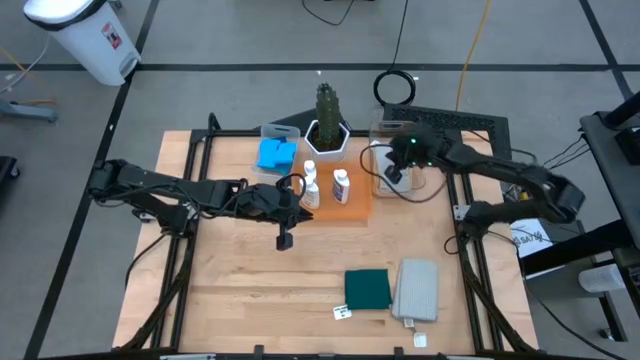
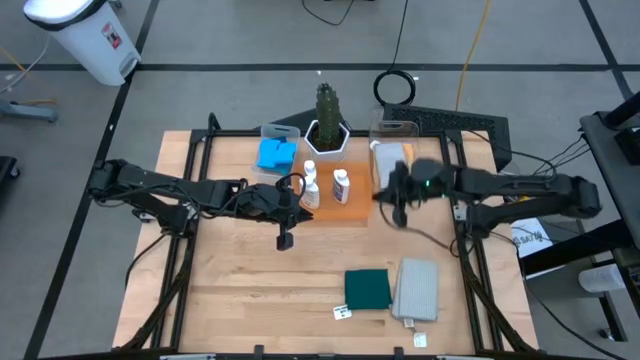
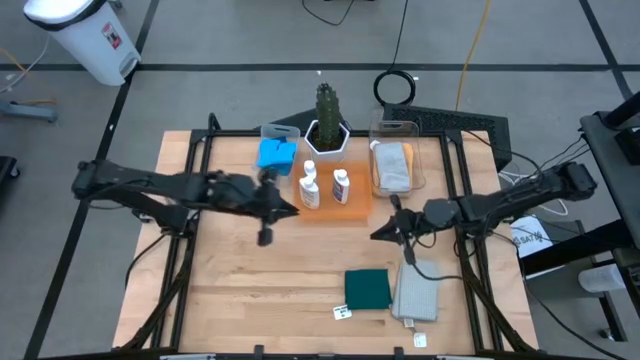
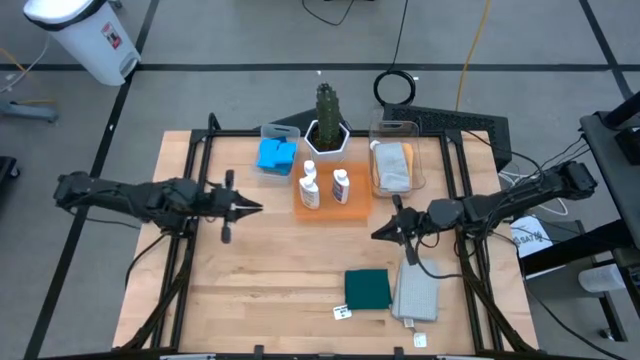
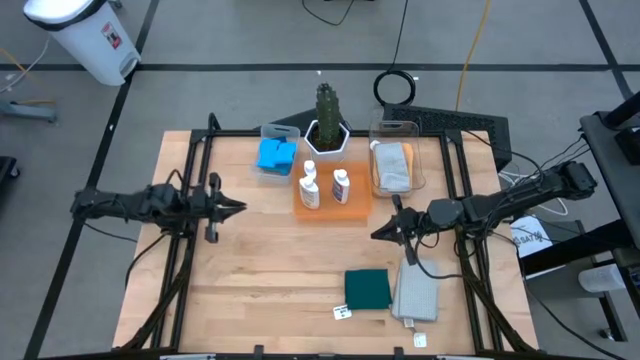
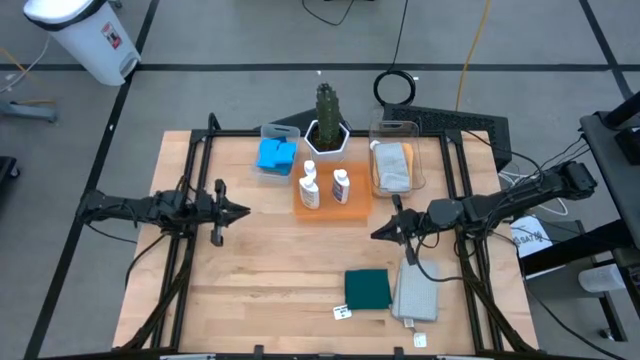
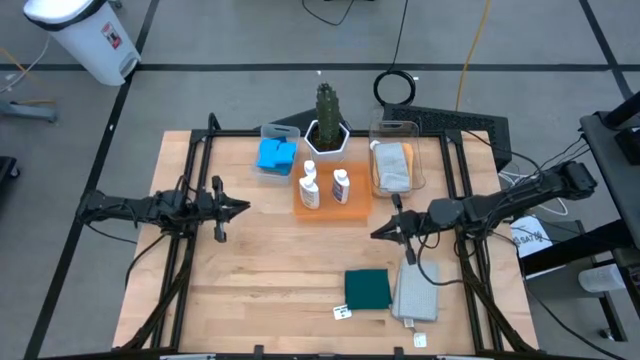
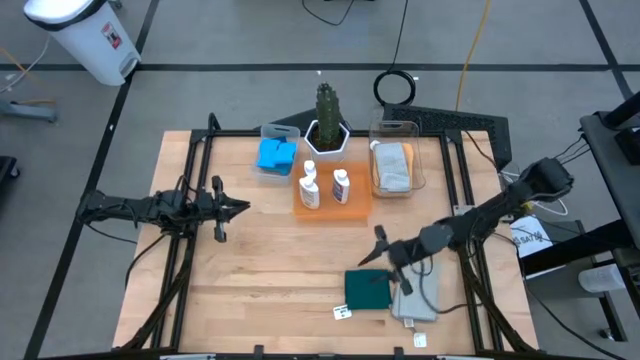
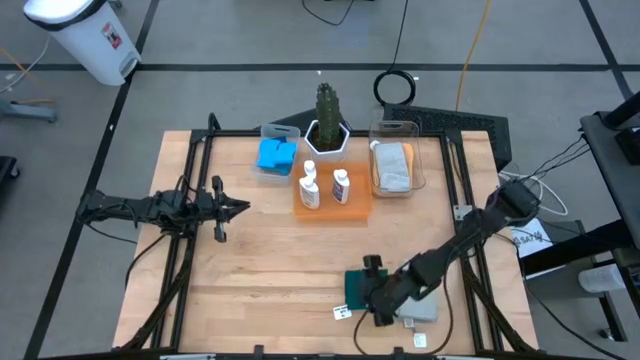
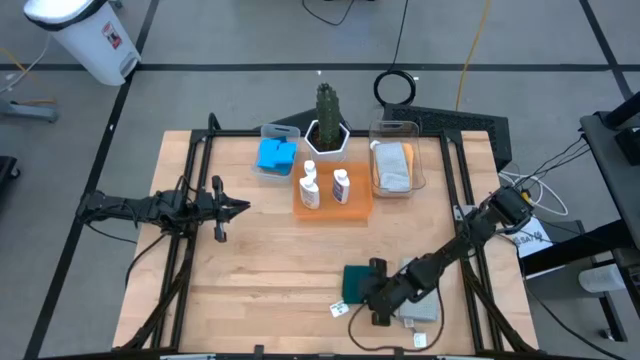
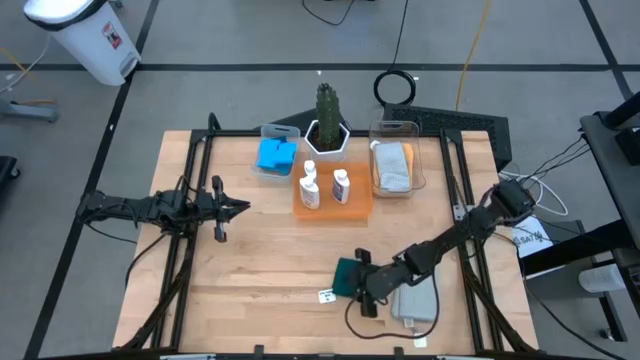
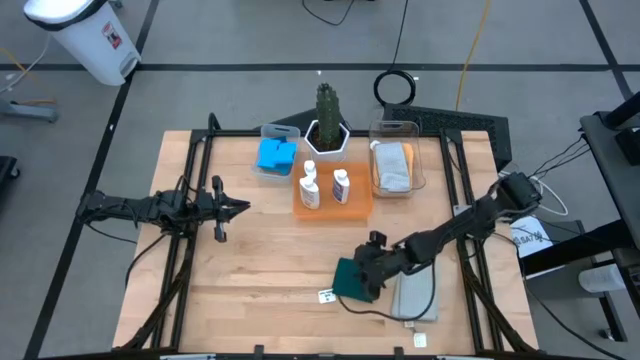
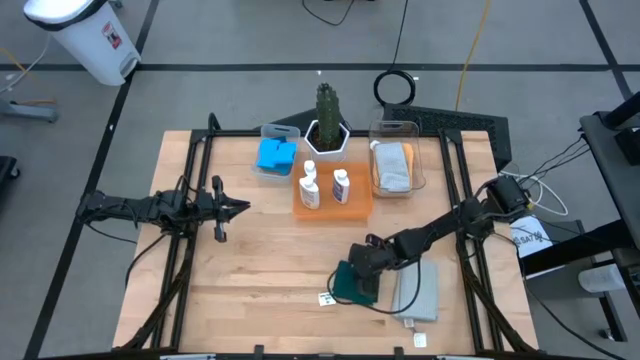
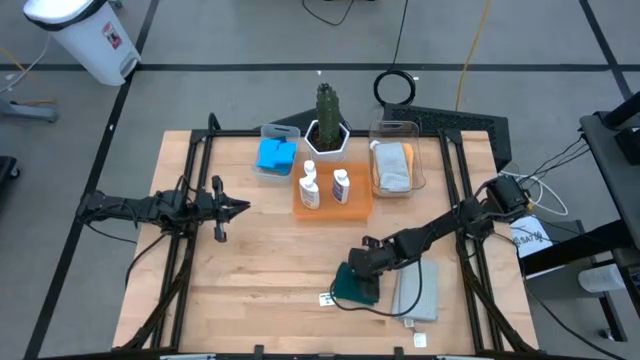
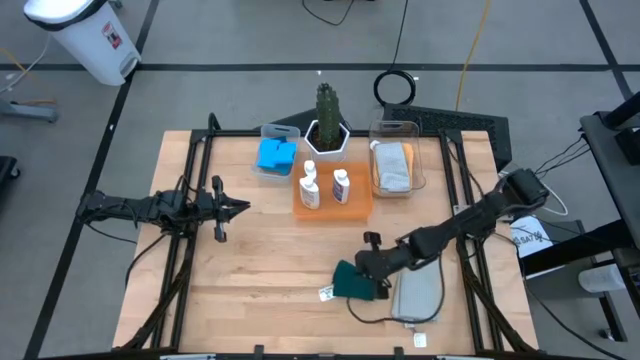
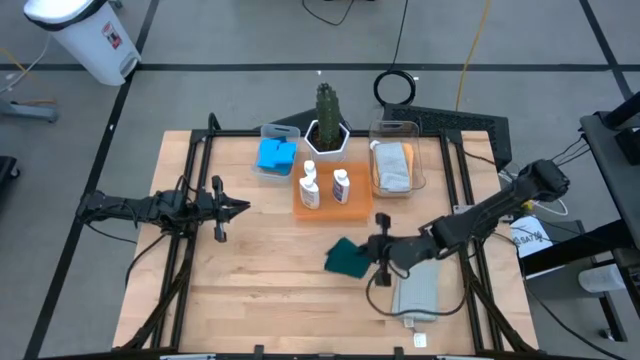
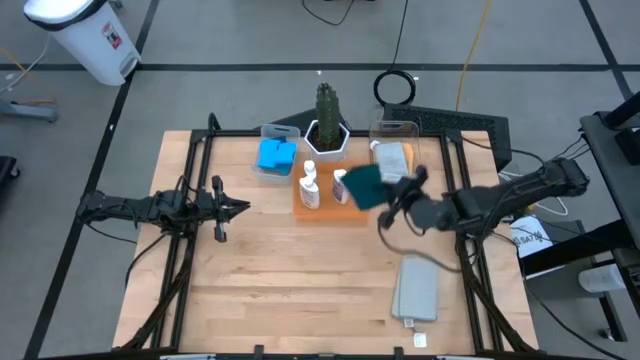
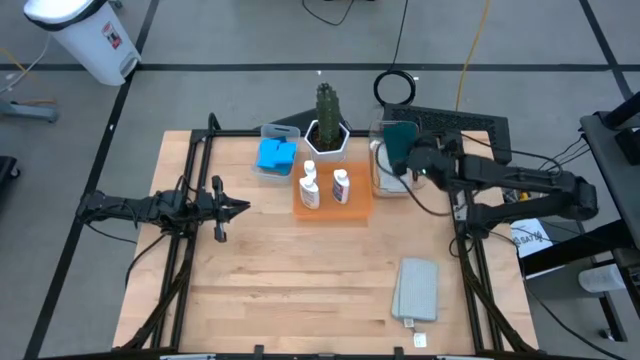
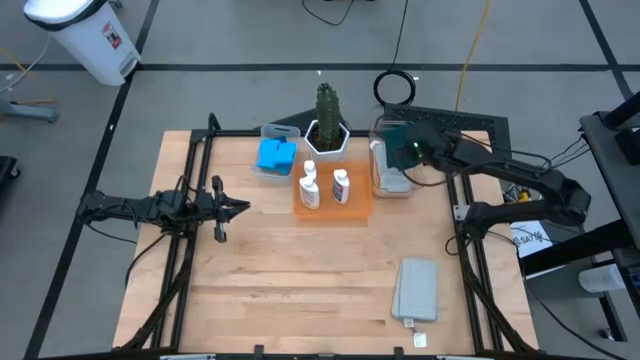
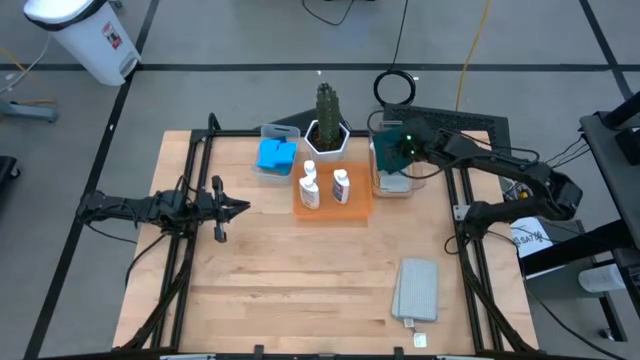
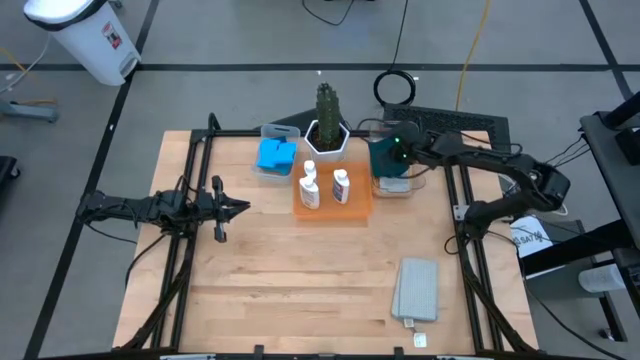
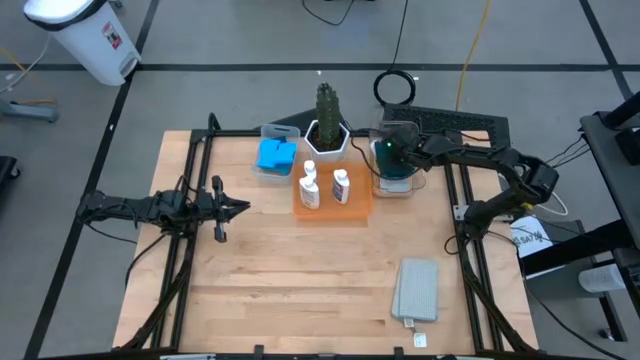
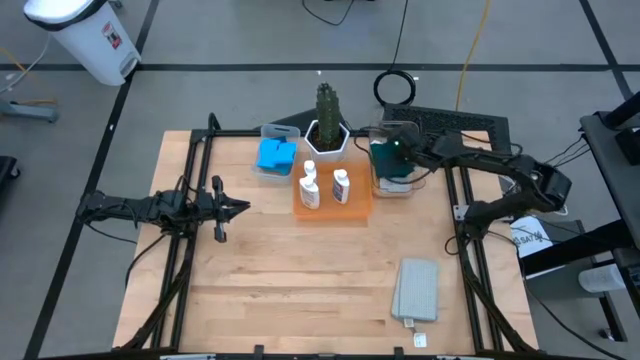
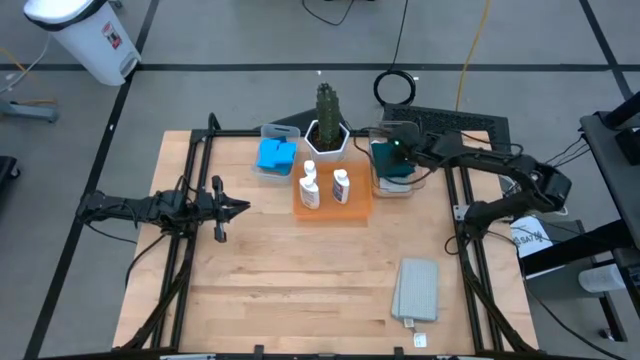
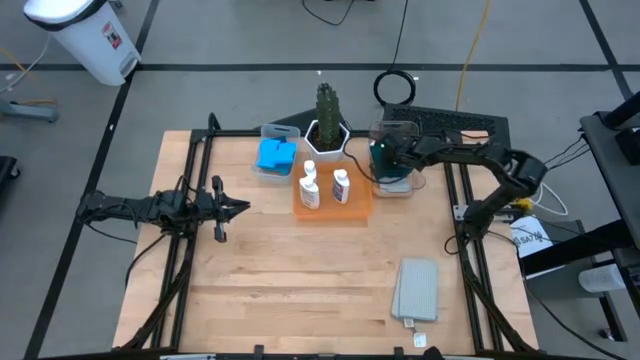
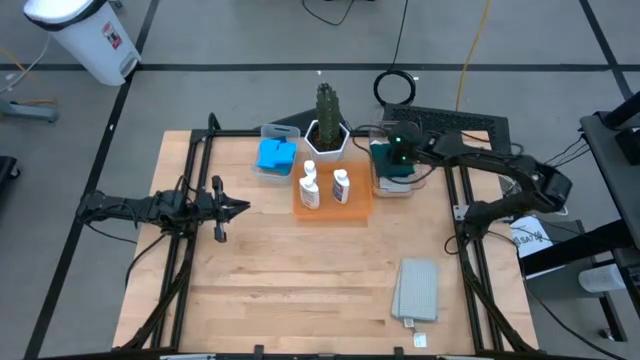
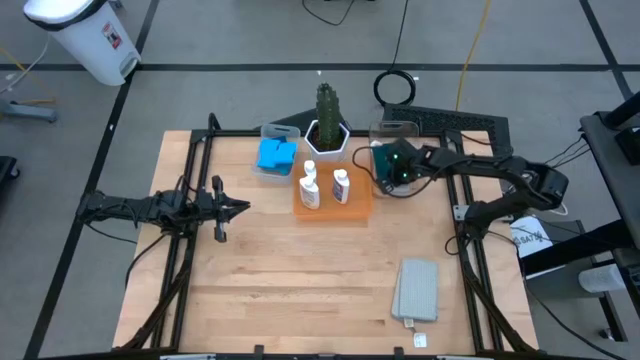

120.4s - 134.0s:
Task: Pick & Place Kitchen Items
Put the blue microfiber towel into the transparent bin

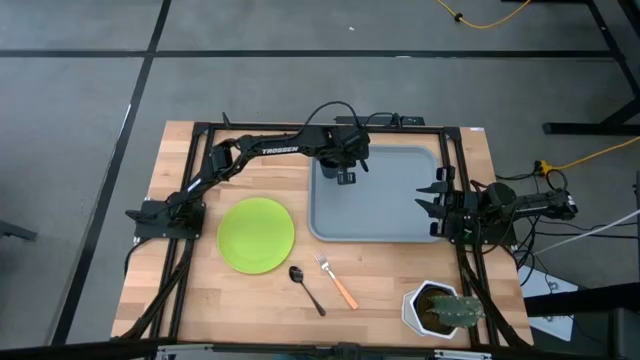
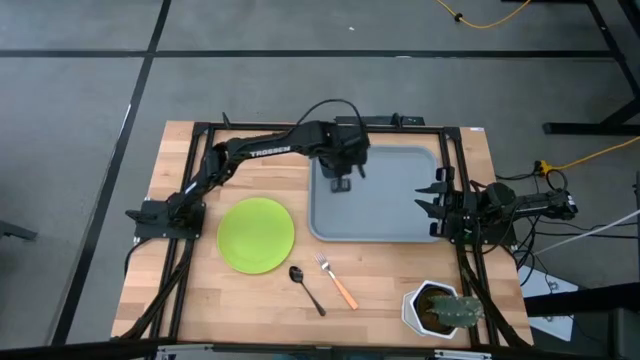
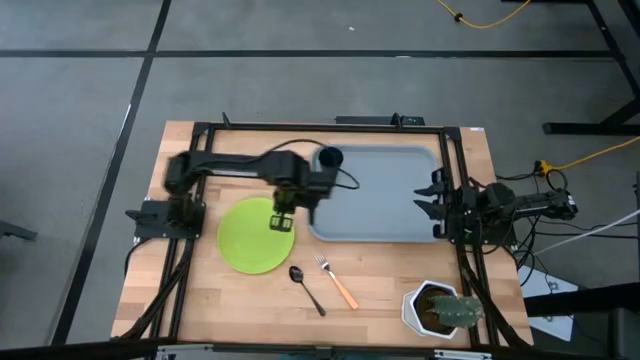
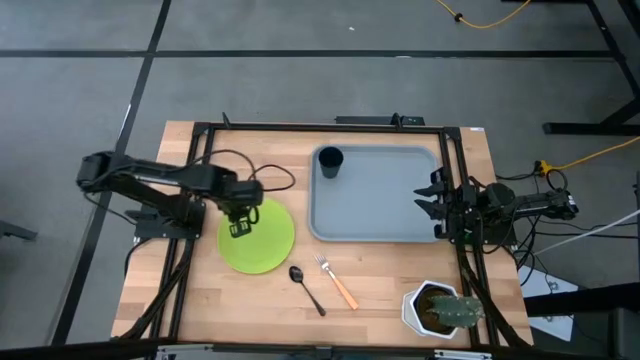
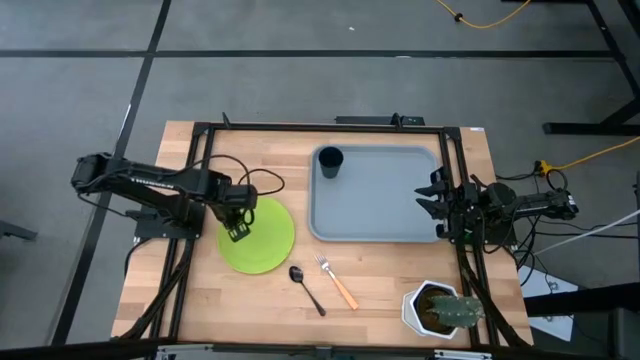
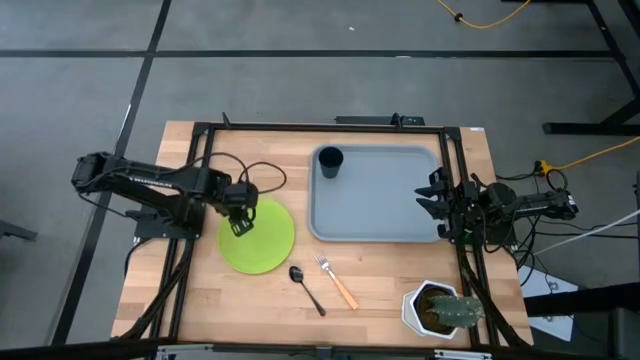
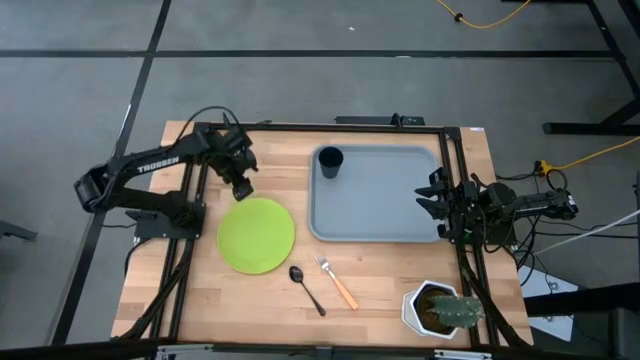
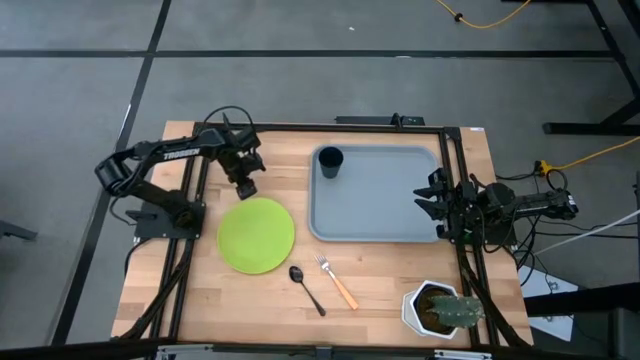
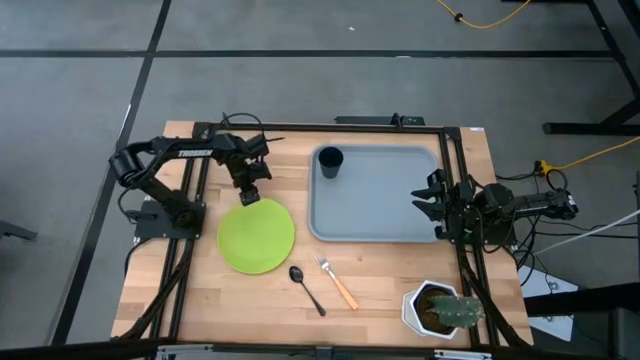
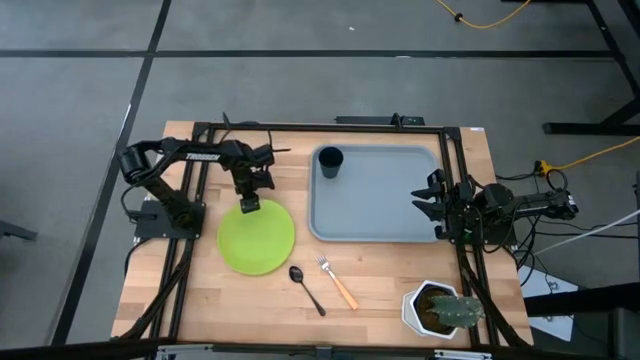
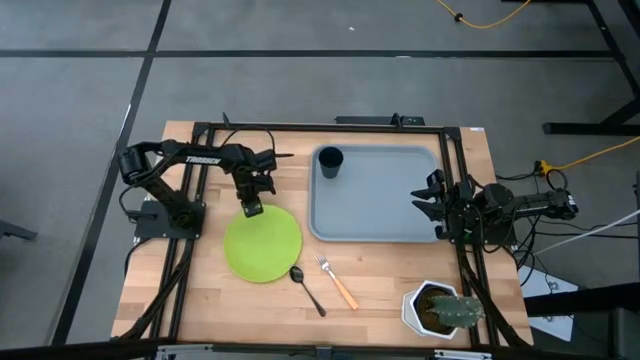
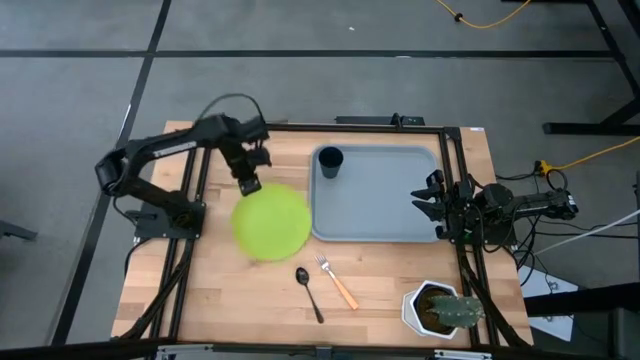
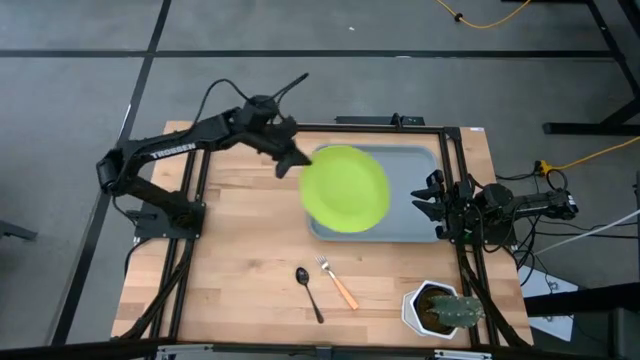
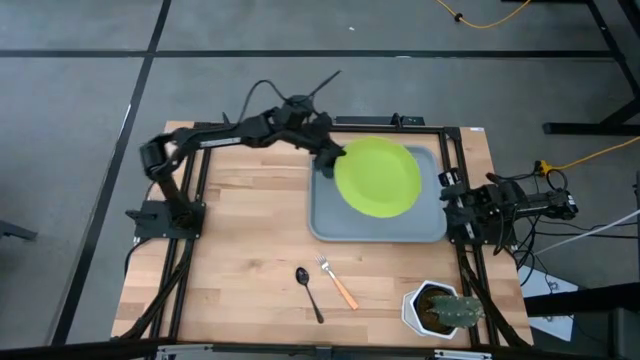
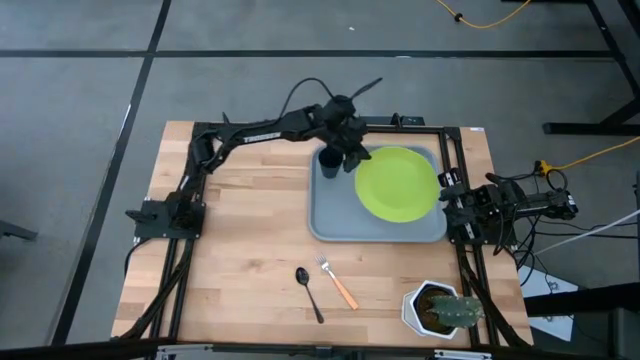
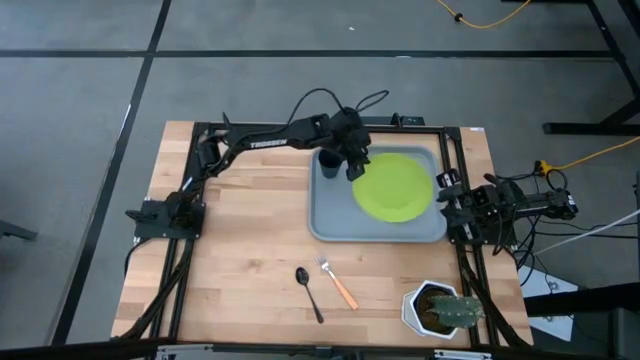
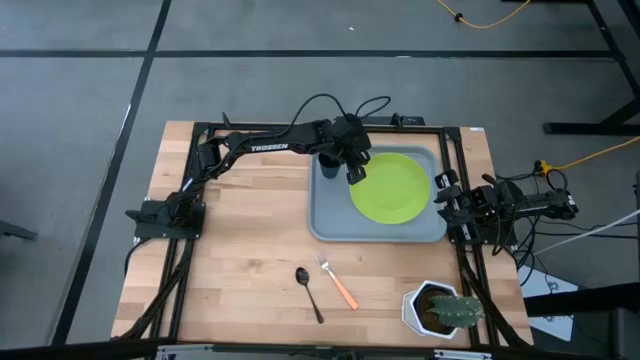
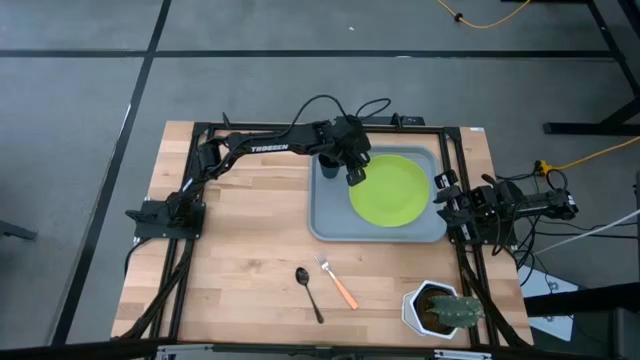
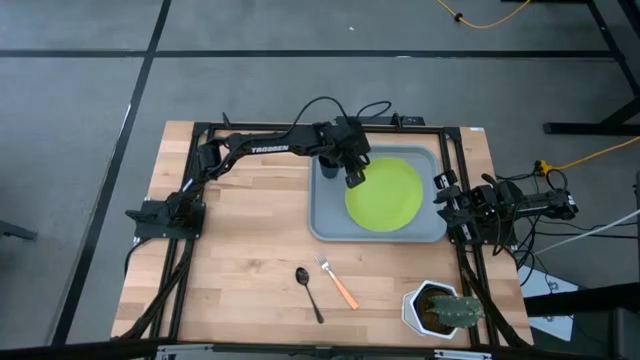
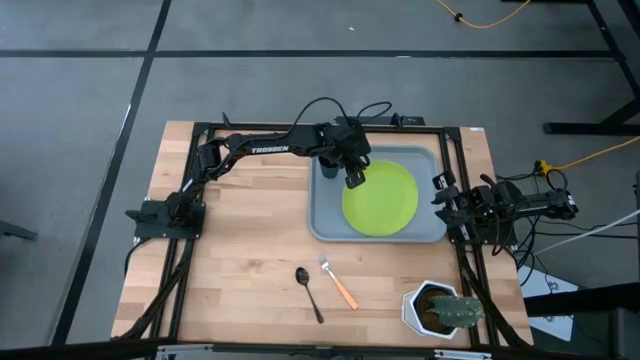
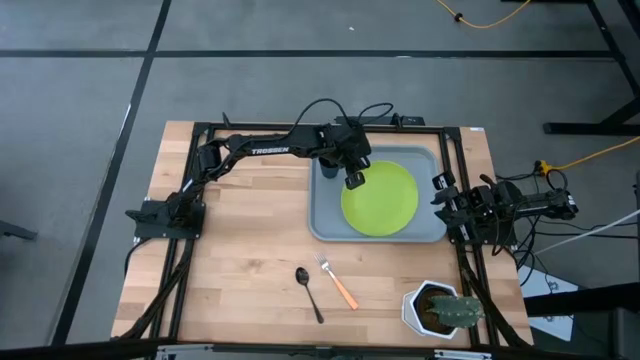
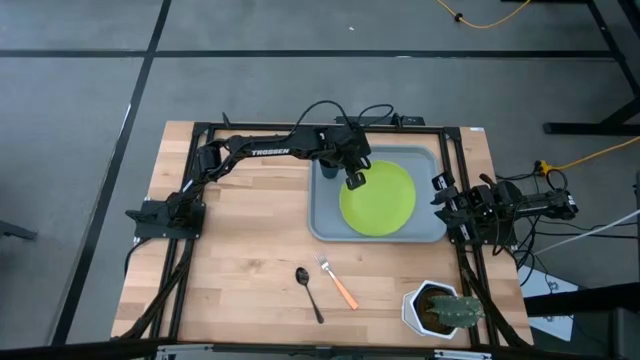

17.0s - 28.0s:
Task: Pick and place plate/cup/fork/spoon on tray
Put the light green plate on the gray serving tray to the bottom of the black cup
